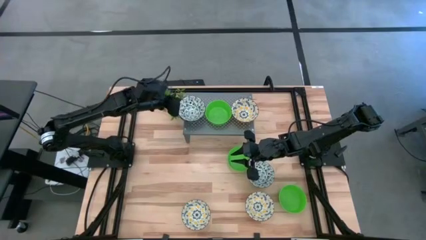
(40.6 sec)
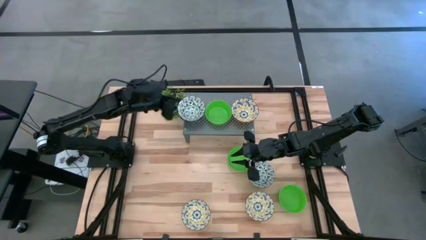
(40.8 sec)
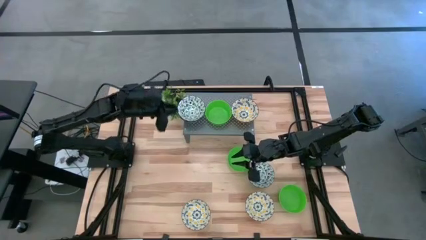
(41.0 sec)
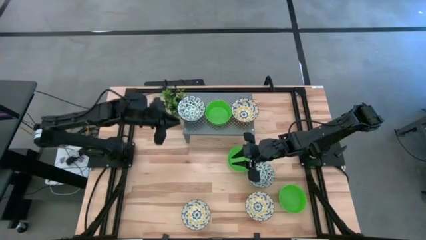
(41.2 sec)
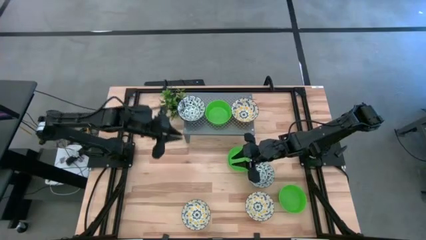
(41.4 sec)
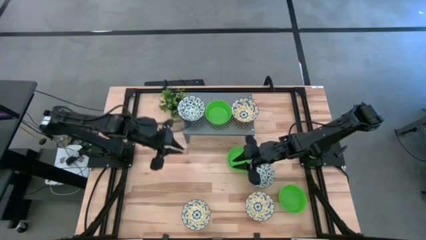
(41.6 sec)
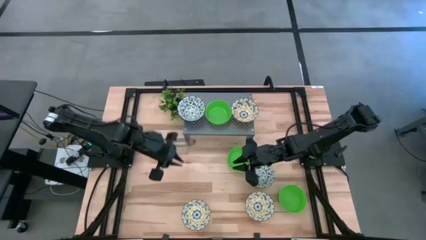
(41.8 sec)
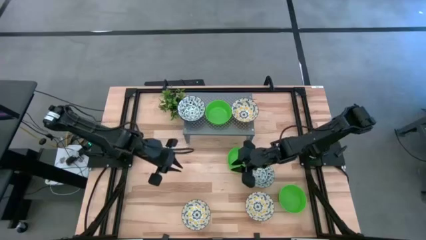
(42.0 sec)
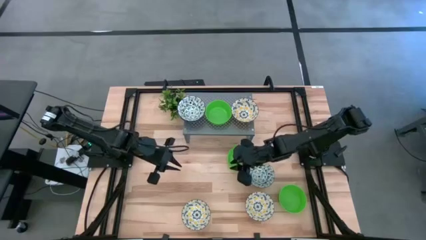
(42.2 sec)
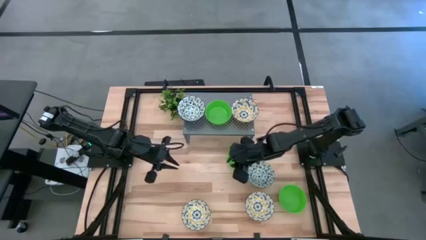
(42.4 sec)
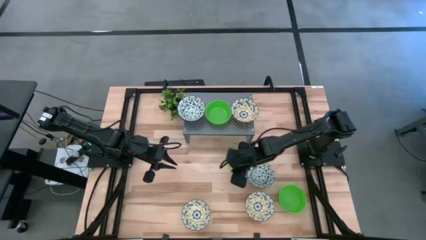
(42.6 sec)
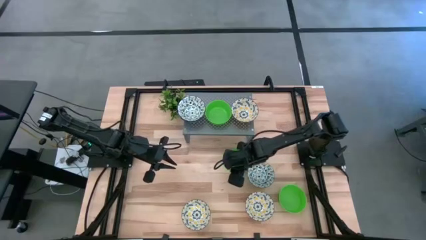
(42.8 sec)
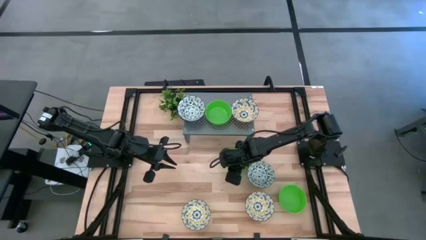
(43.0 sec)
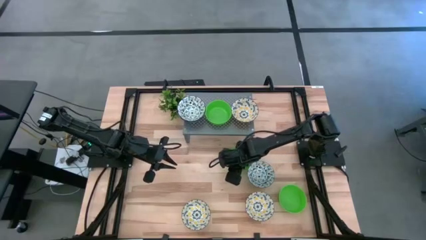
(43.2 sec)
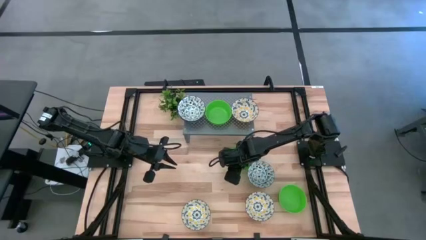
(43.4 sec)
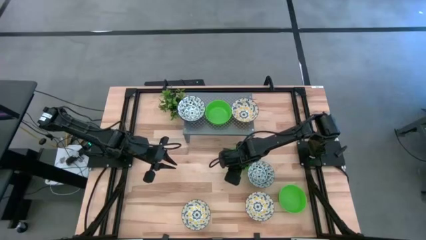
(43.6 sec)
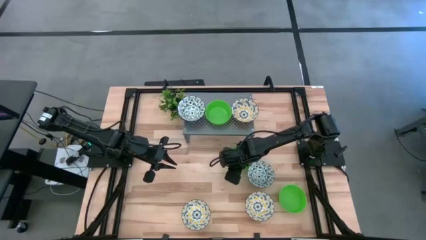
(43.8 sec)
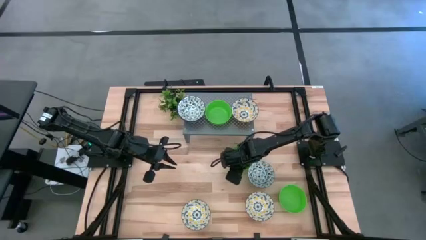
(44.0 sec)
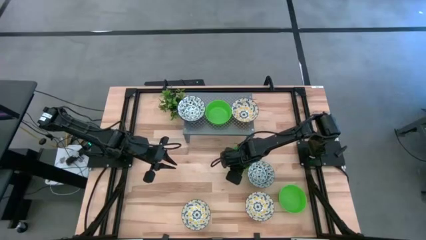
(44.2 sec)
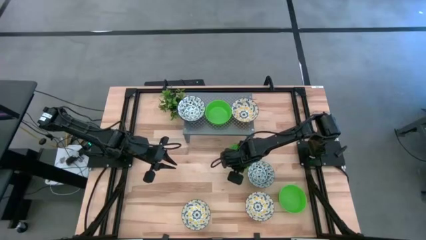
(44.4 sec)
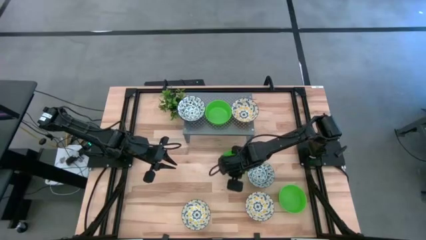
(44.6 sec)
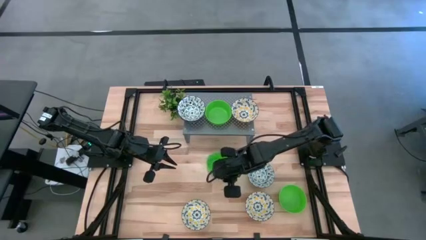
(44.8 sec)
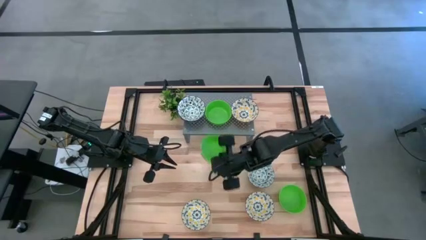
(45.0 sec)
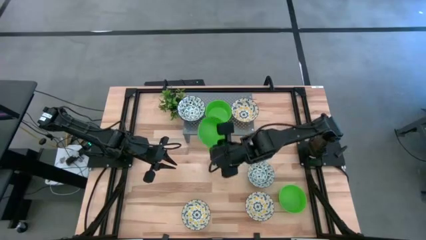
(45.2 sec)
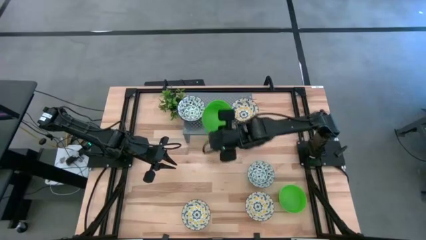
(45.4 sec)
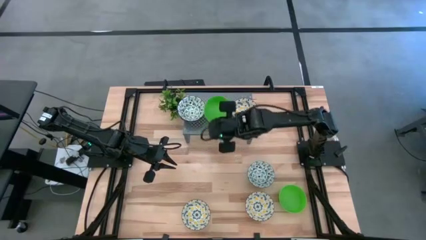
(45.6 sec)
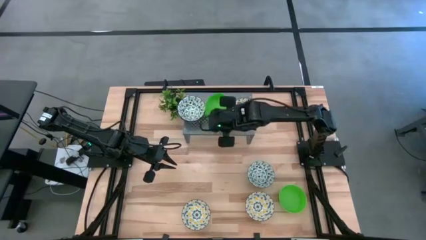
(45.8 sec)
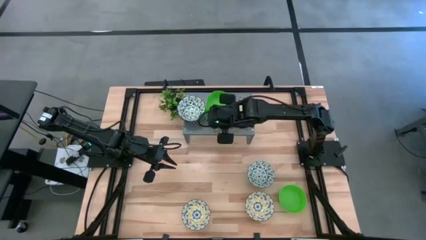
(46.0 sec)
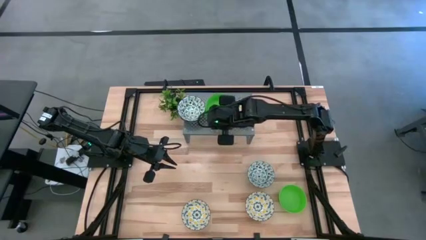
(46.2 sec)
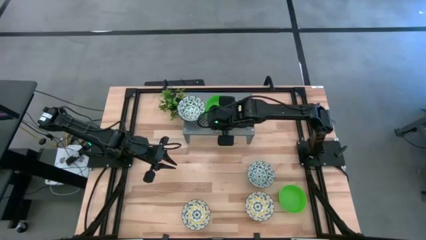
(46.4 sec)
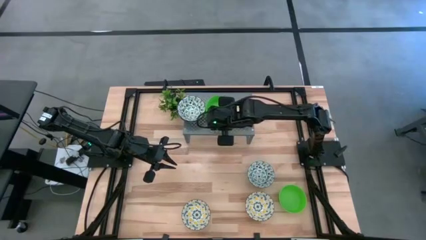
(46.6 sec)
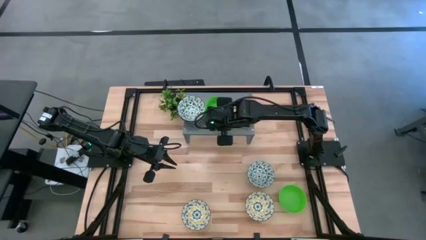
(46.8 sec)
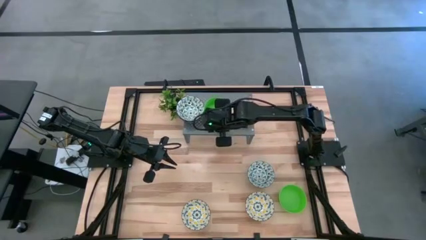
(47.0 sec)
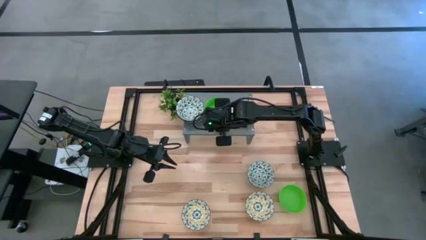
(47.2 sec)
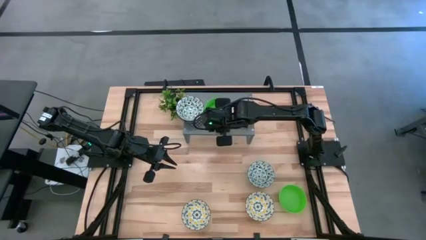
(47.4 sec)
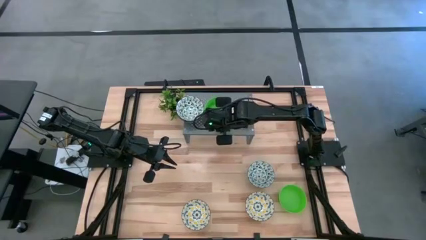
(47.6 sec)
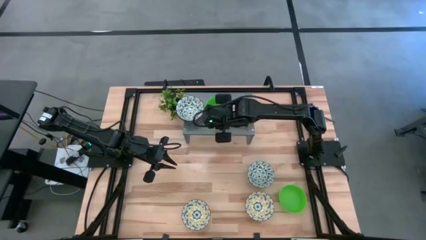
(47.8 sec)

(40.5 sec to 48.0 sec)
Task: Pick & Place Mini bowls
Stack the left green bowl on the other green bowl on the shelf

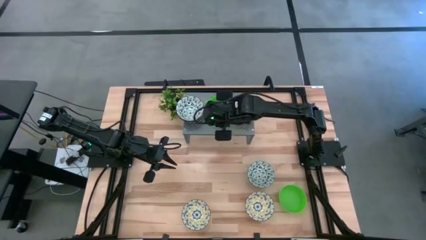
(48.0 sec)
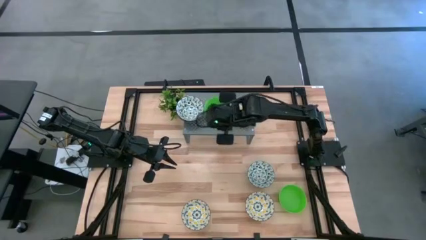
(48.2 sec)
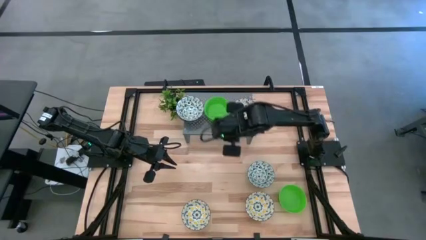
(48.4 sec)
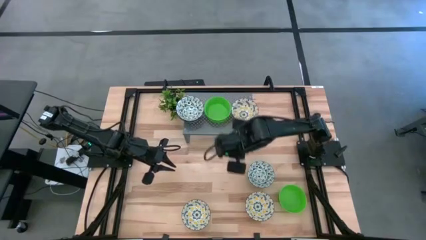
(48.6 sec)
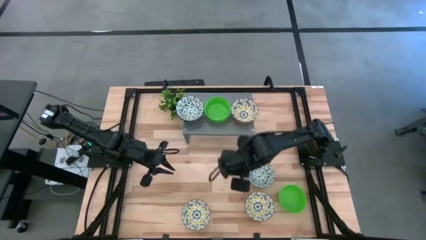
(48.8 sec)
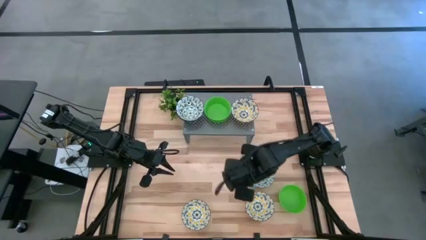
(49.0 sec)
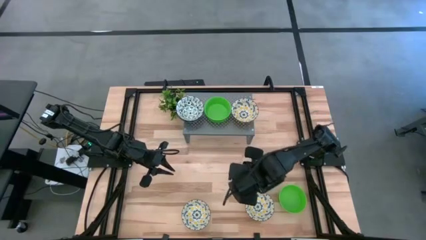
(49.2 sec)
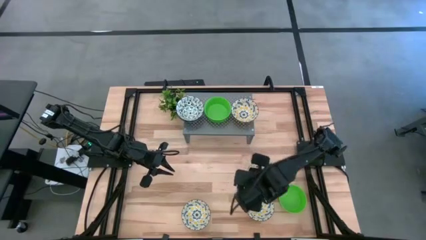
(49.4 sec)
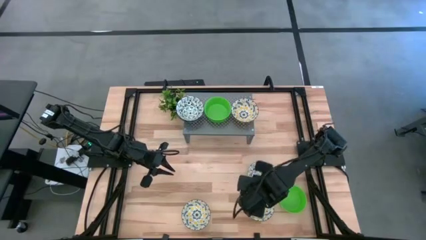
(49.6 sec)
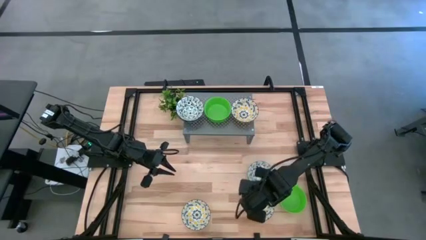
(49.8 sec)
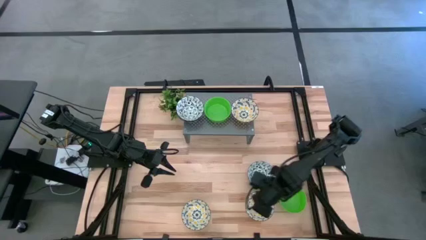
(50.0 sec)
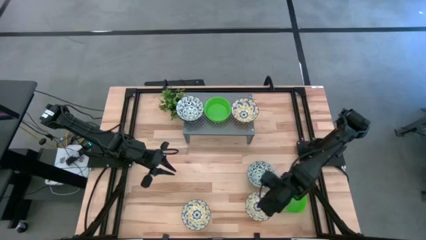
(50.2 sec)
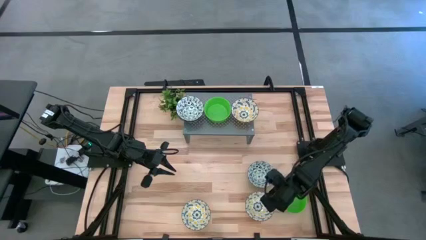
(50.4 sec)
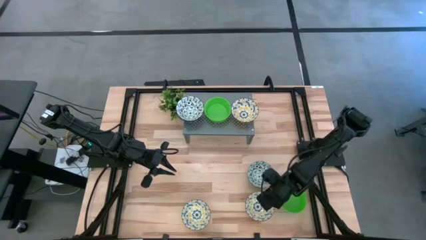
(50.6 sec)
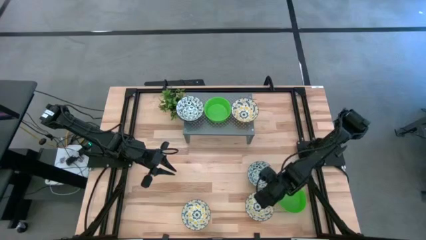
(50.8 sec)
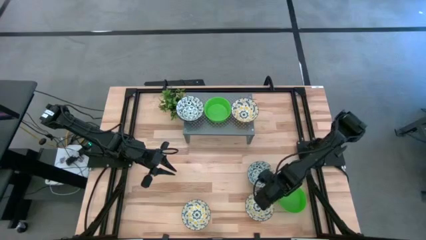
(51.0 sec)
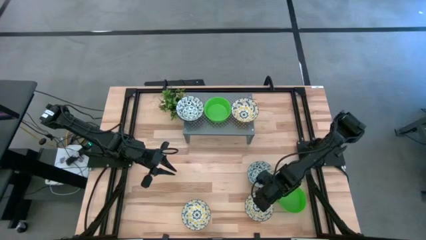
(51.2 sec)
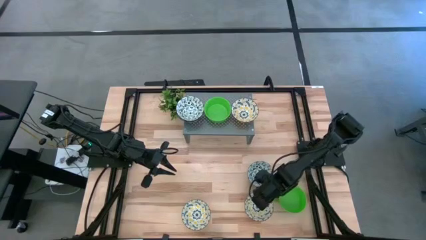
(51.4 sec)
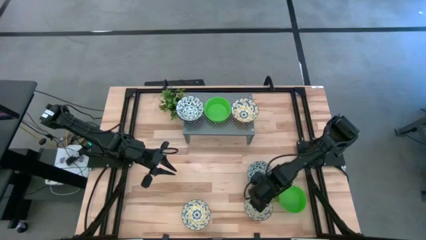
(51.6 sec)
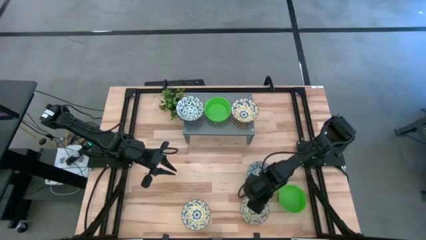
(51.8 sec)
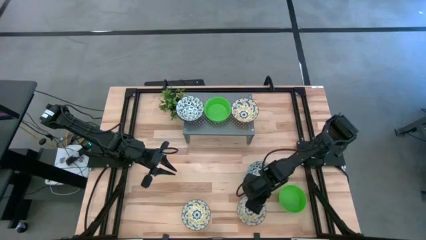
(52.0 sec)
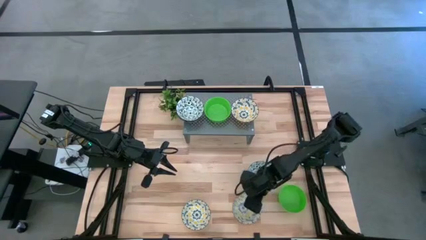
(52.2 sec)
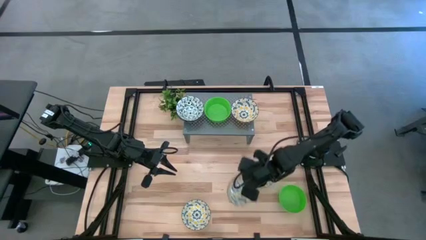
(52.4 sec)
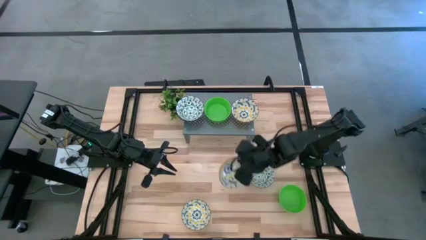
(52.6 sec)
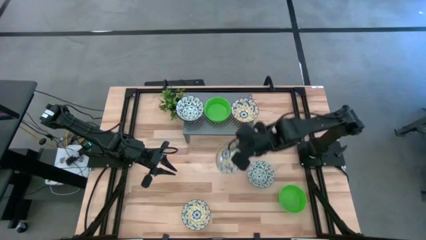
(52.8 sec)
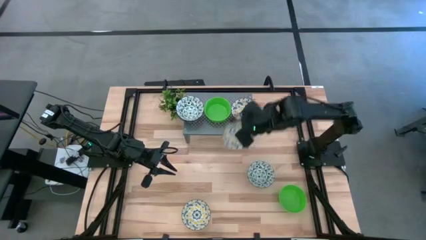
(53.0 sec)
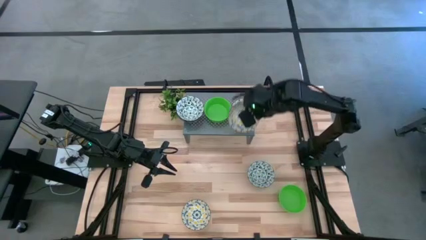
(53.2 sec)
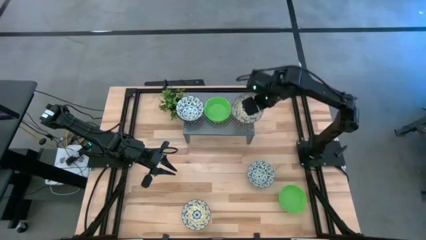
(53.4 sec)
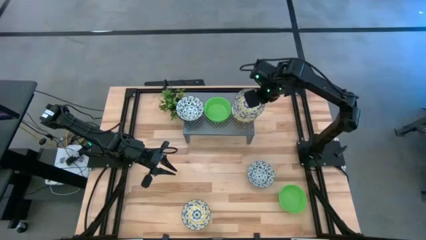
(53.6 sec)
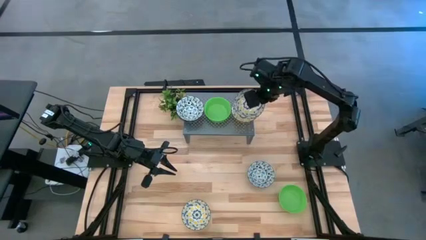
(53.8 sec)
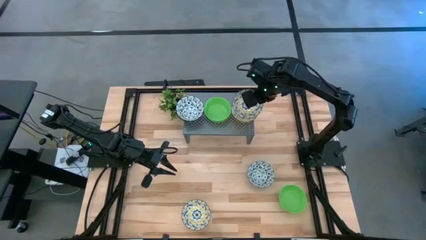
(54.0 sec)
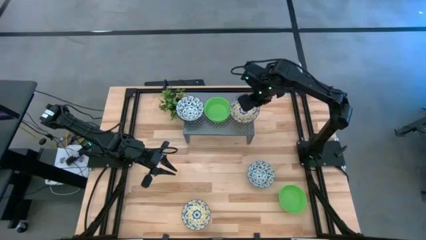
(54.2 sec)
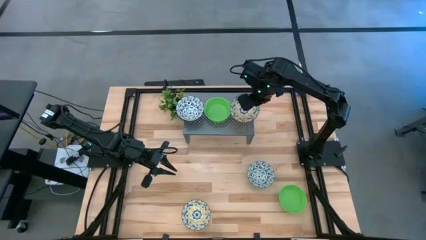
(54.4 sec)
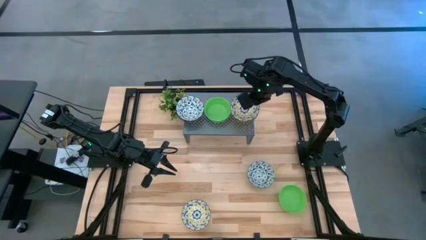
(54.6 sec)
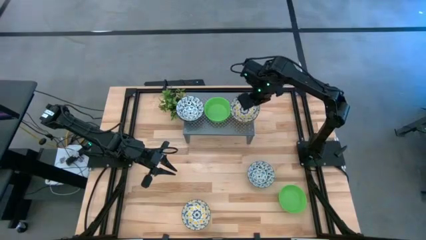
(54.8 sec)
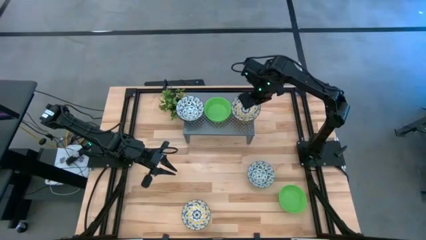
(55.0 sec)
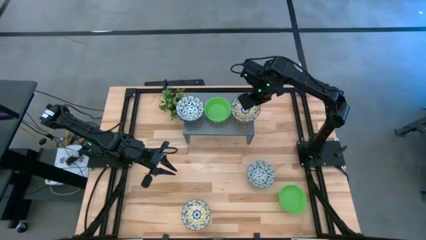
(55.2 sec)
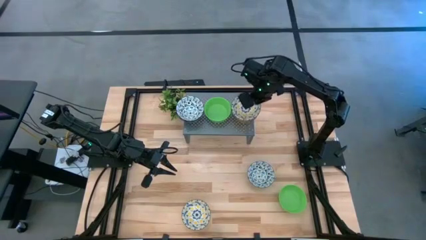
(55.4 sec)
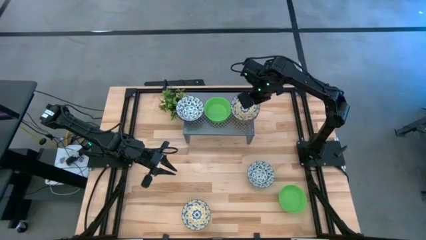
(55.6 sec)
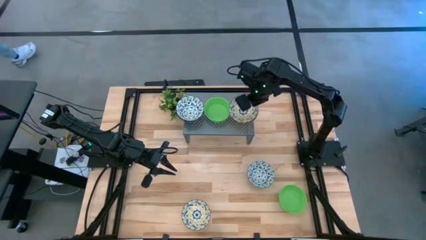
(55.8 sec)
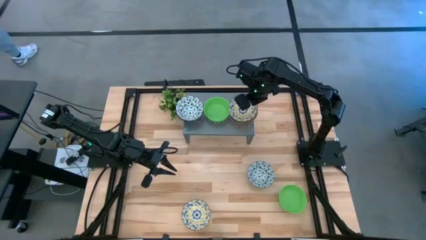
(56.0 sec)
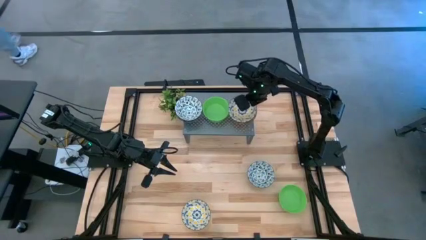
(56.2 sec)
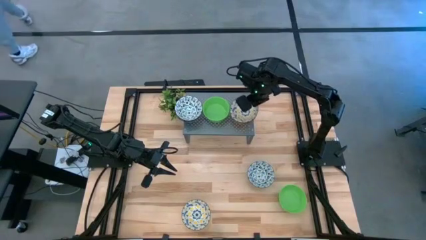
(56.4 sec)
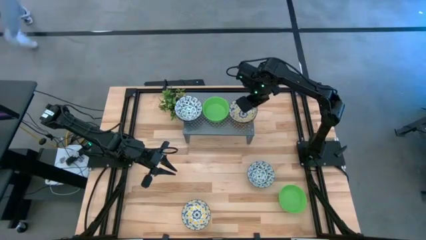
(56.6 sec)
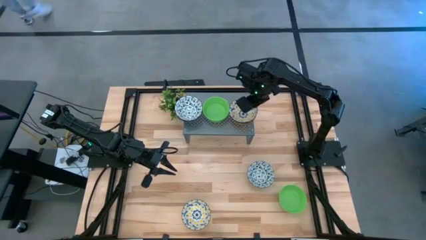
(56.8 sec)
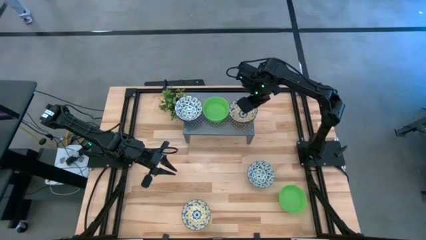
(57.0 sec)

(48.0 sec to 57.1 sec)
Stack the right yellow and white patterned bowl on the other yellow and white patterned bowl on the shelf

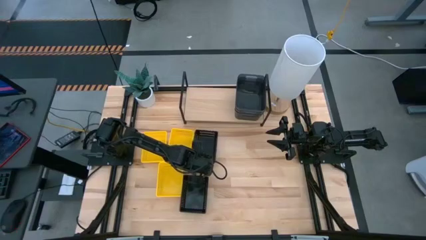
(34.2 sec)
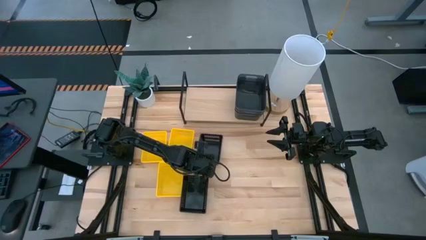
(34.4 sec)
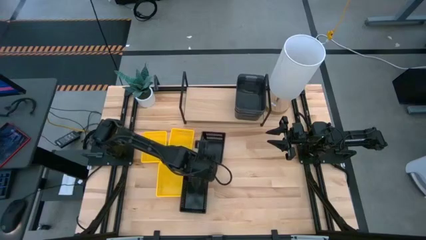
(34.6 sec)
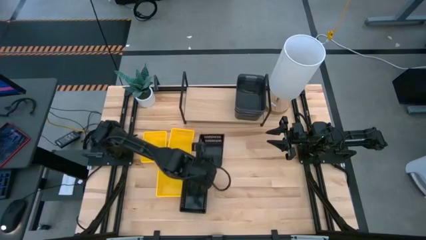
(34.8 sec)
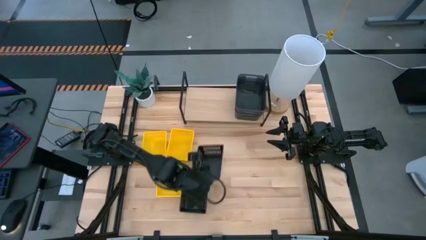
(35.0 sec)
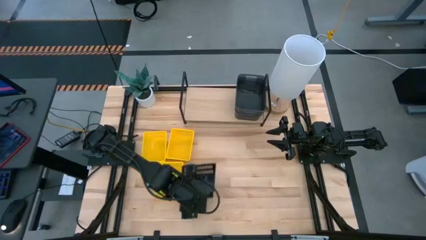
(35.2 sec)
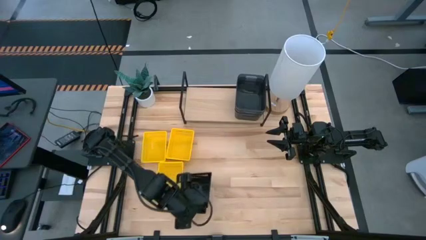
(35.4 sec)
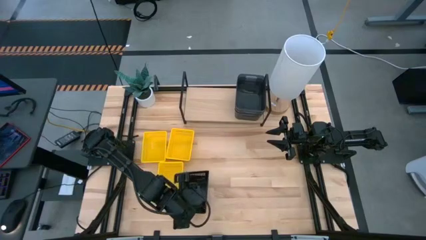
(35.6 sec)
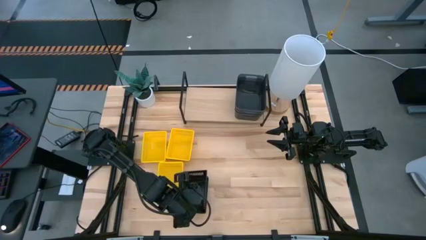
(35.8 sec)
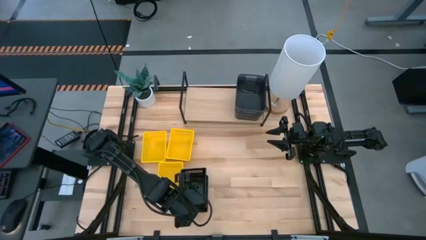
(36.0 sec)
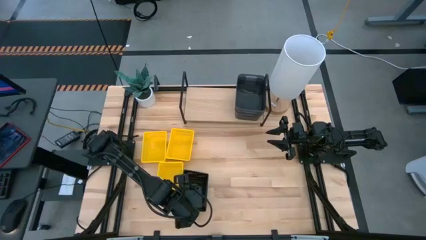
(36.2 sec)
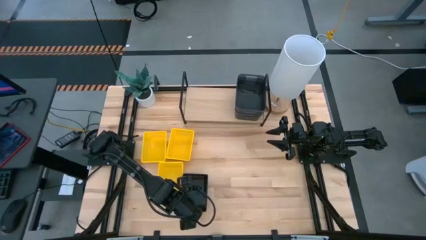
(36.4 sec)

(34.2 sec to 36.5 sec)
Task: Stack baskets on shelf by color
Stack the top black basket on the black basket
